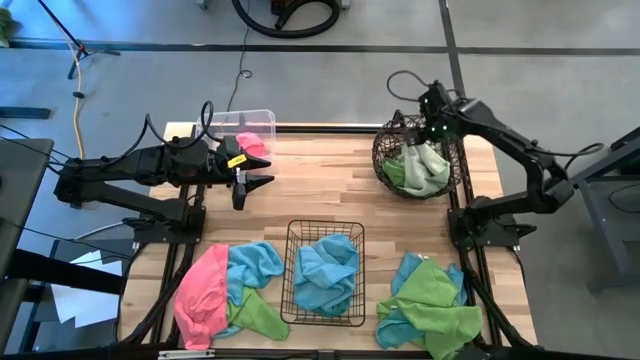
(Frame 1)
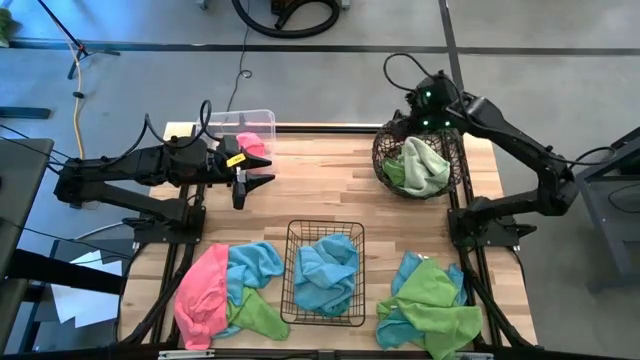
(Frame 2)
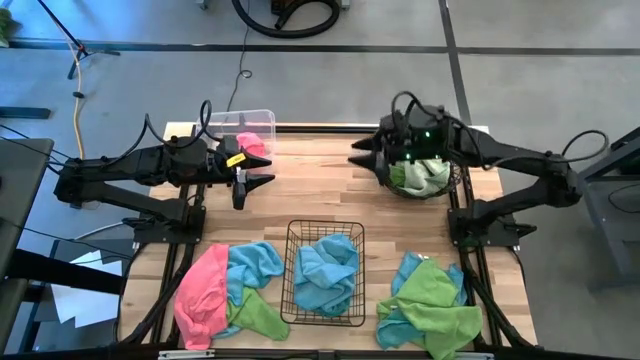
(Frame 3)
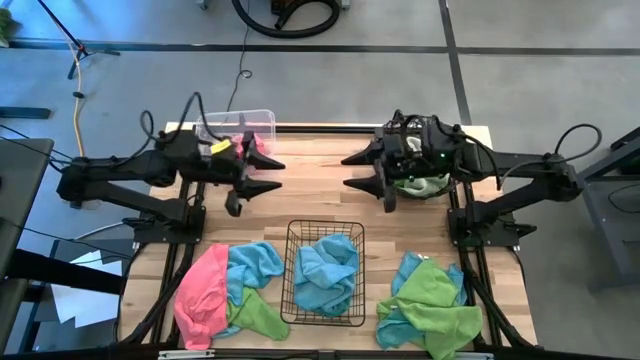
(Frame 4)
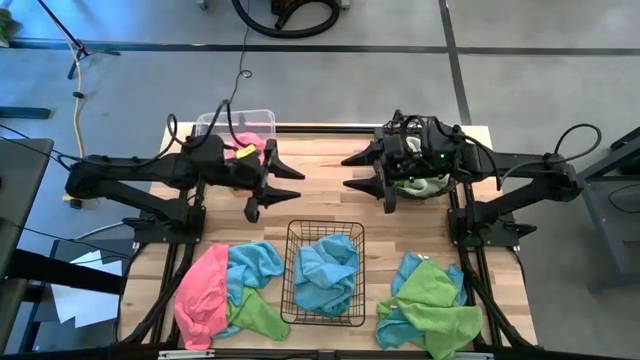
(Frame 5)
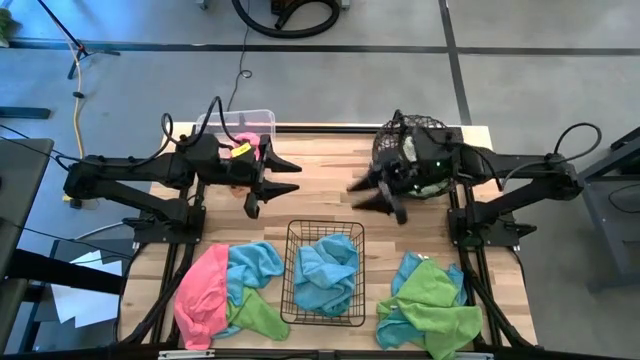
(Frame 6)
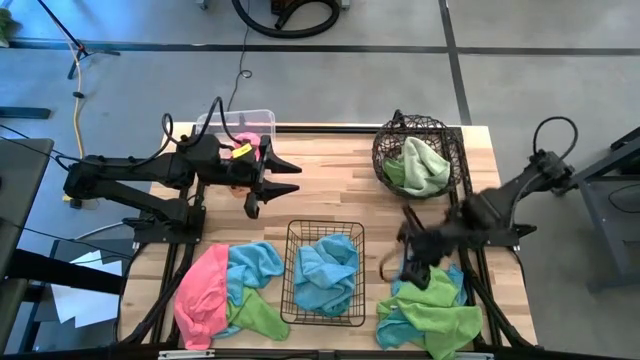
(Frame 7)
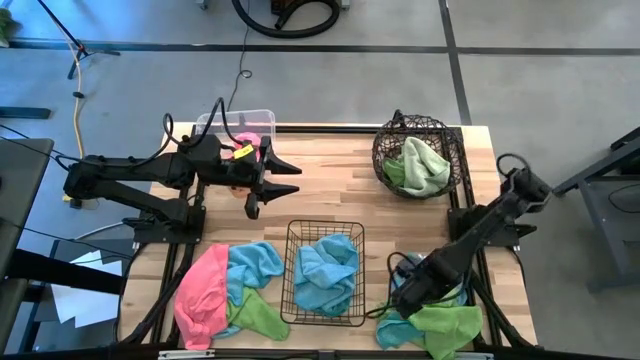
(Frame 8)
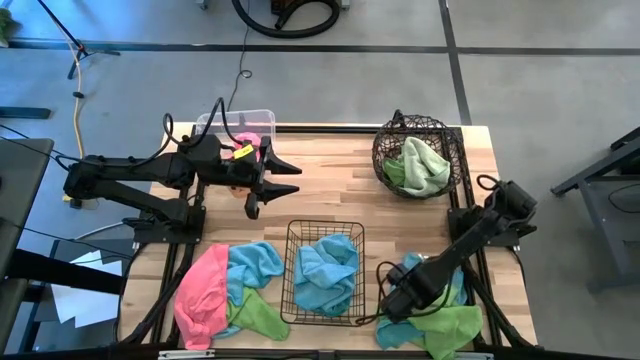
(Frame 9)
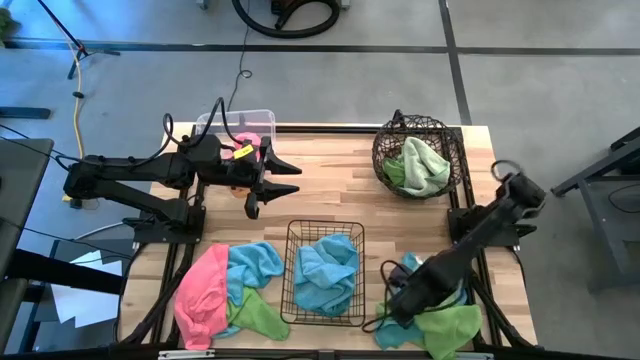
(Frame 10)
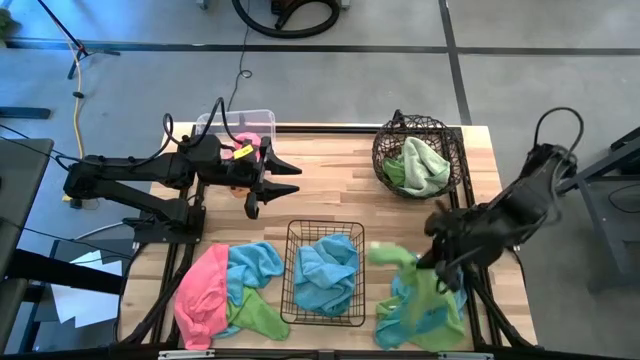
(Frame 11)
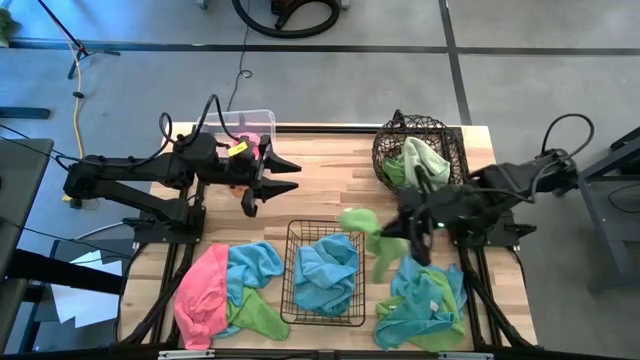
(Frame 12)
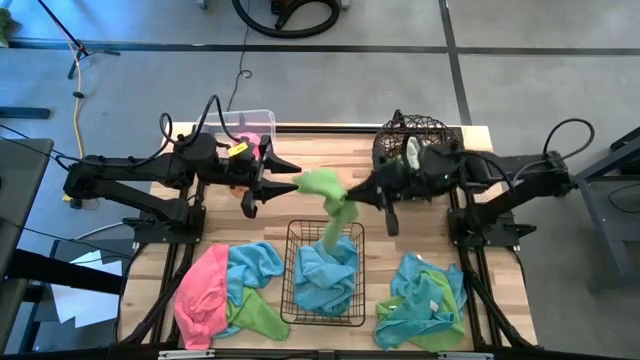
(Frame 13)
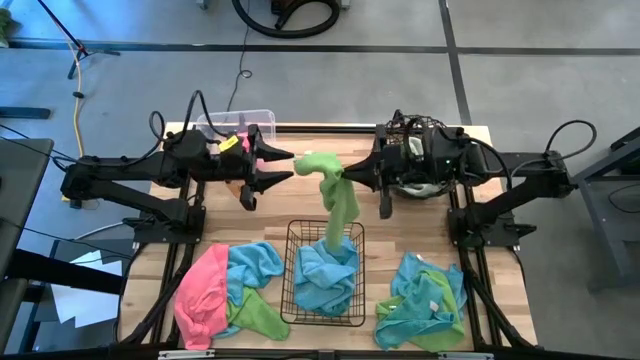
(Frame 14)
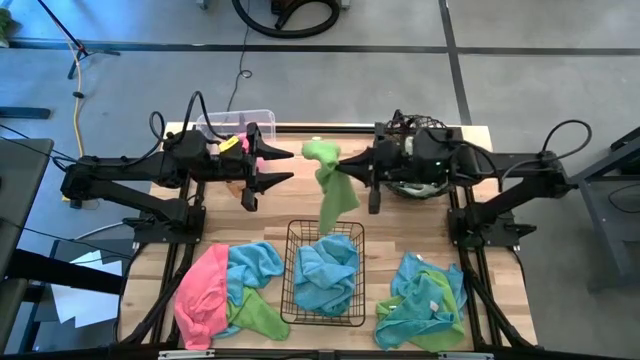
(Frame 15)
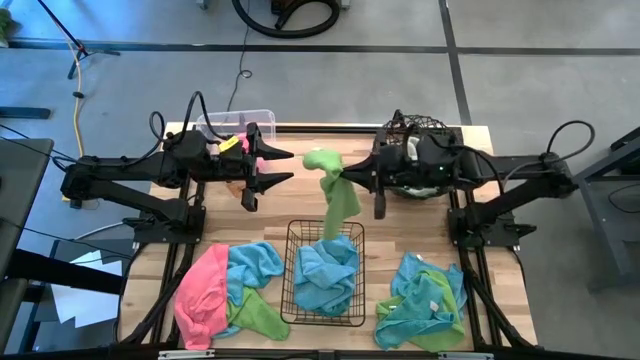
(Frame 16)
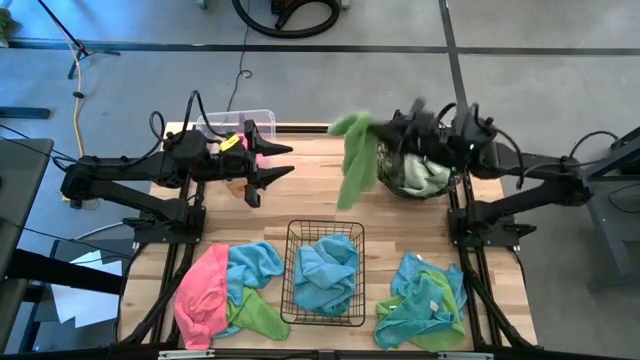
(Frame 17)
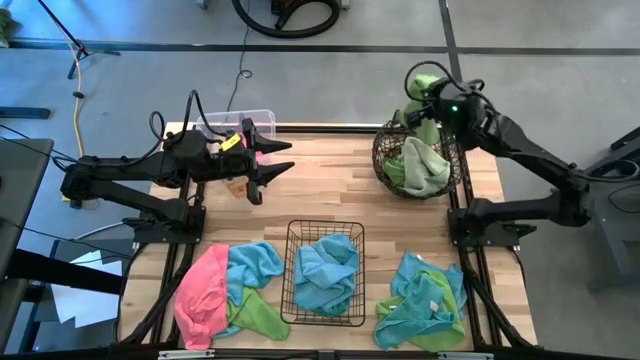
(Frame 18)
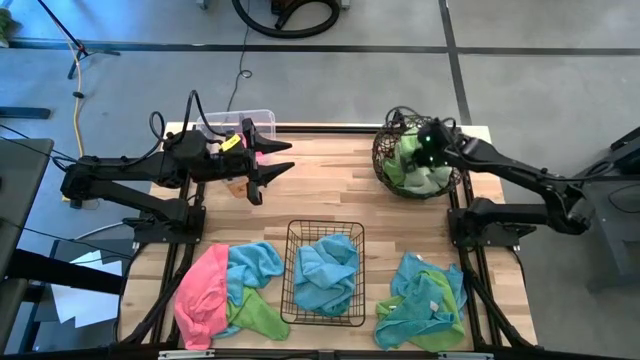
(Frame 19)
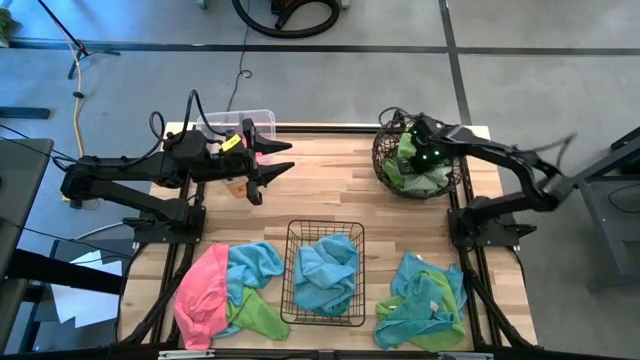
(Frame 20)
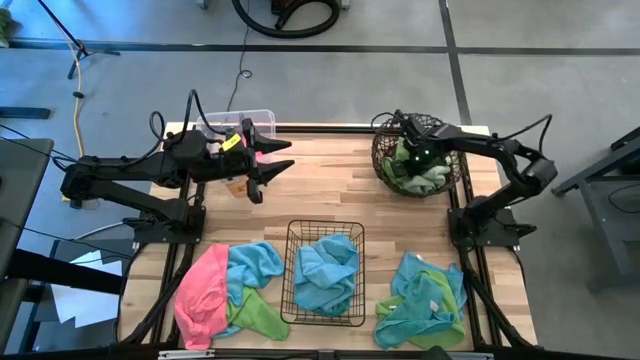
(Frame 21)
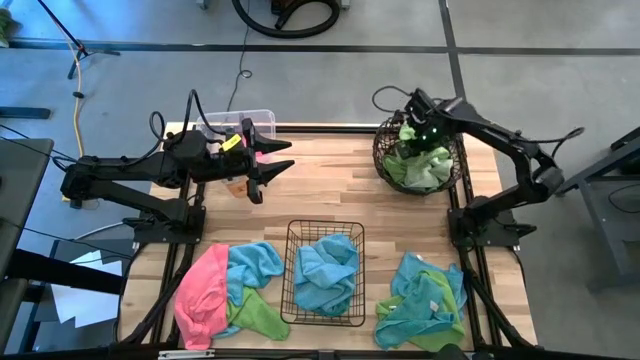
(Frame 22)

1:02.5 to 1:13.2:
Task: Sort microfiber towel by color & place in baskets
Put the green towel into the top right basket

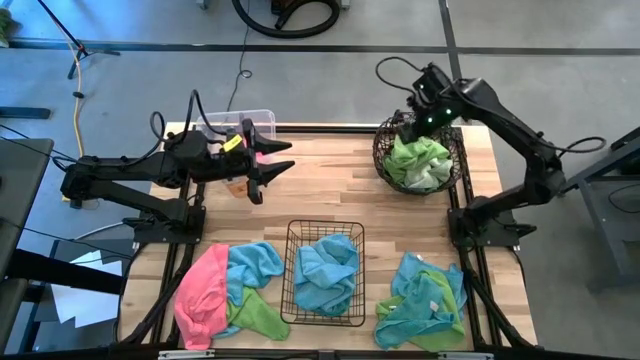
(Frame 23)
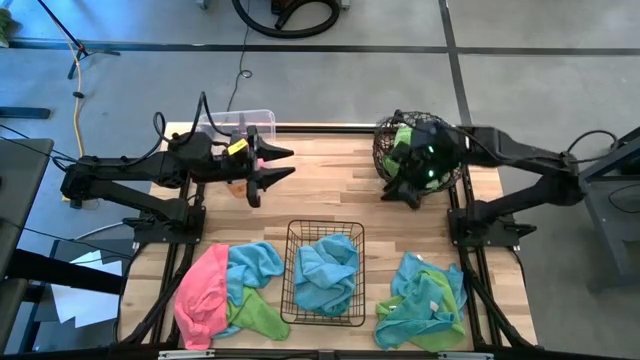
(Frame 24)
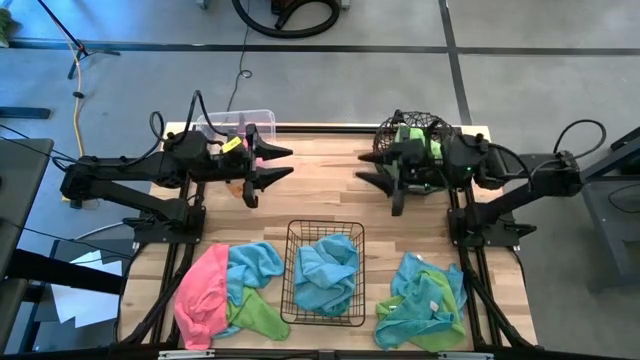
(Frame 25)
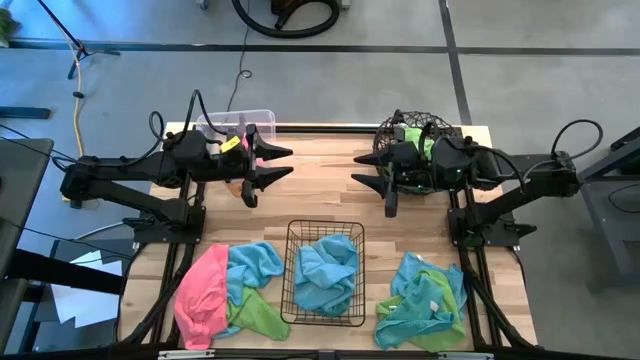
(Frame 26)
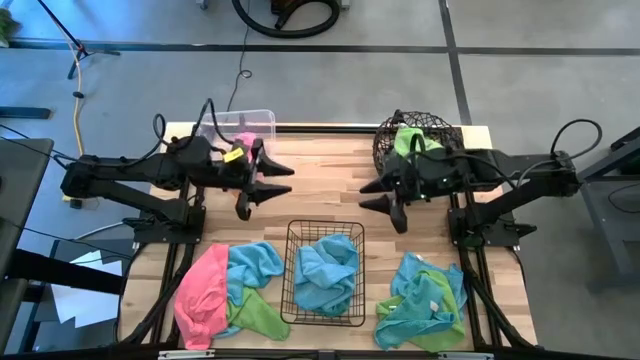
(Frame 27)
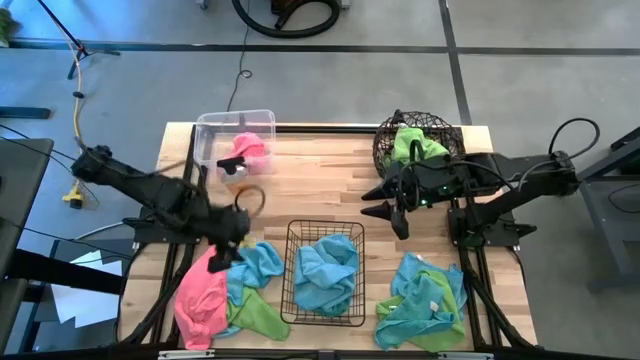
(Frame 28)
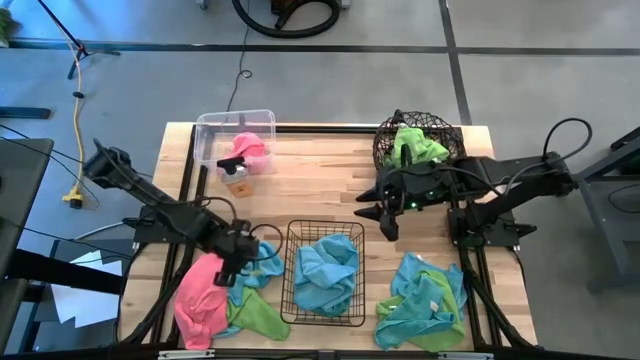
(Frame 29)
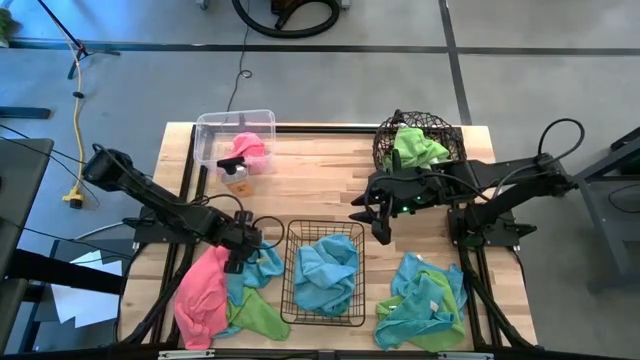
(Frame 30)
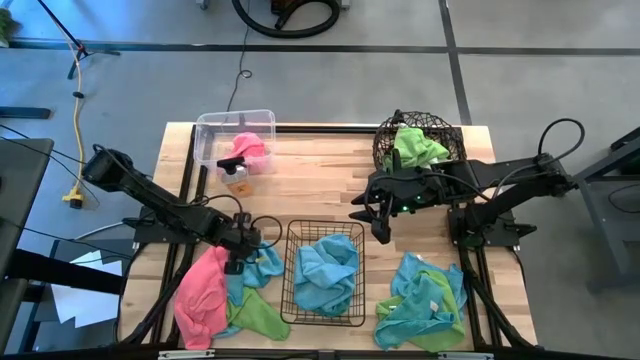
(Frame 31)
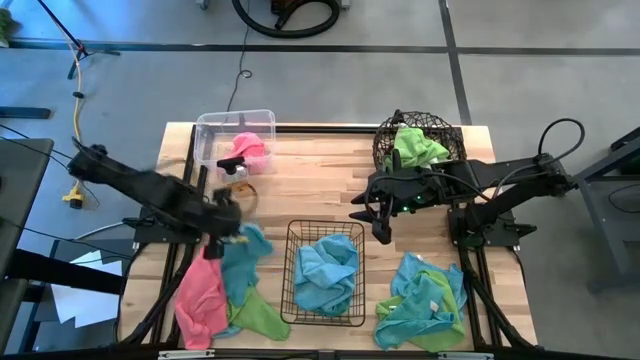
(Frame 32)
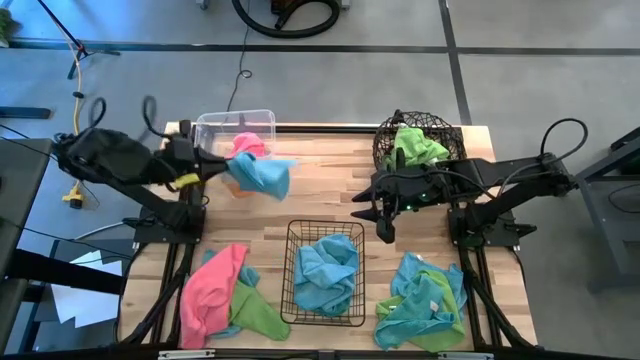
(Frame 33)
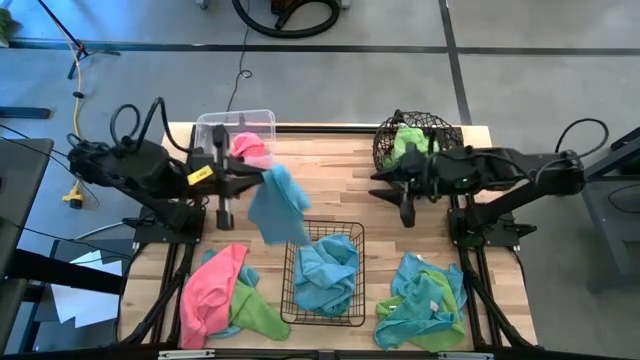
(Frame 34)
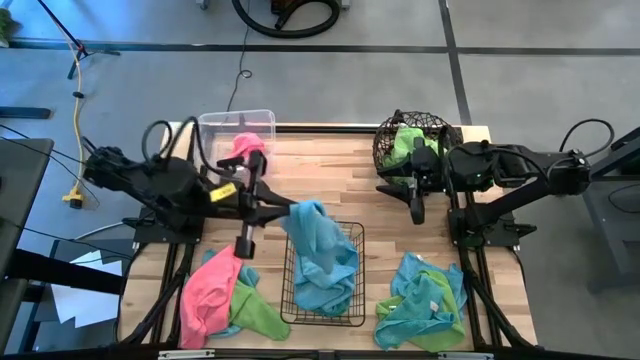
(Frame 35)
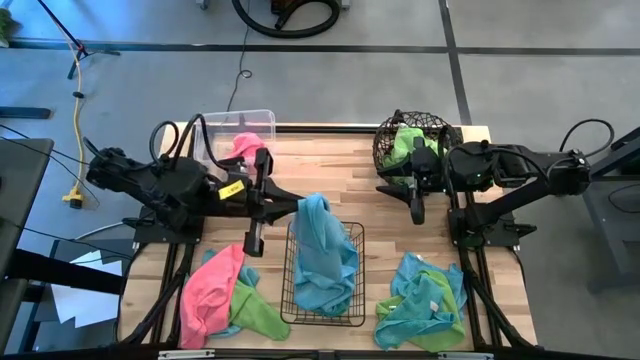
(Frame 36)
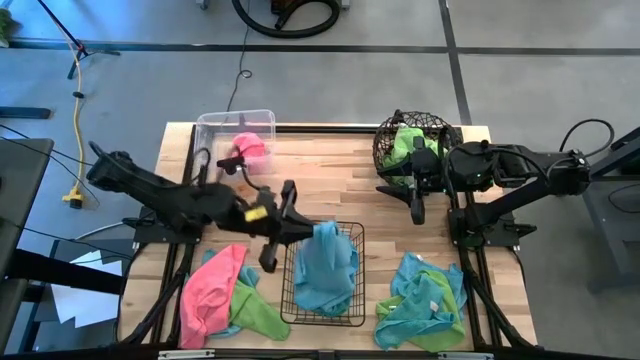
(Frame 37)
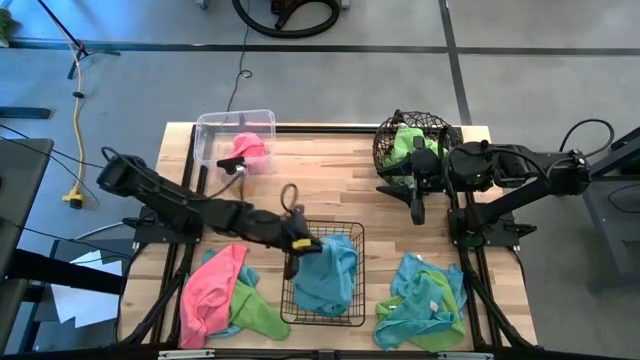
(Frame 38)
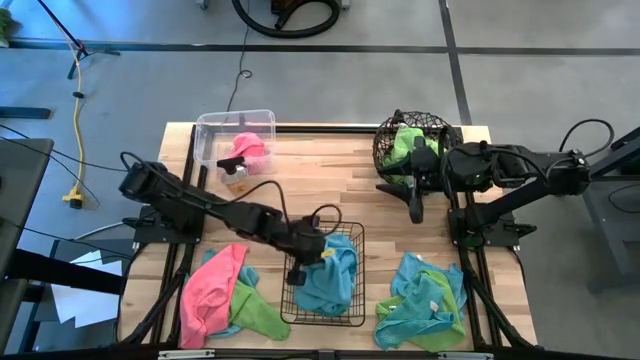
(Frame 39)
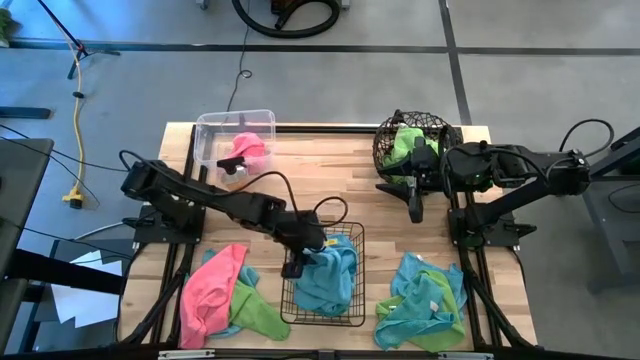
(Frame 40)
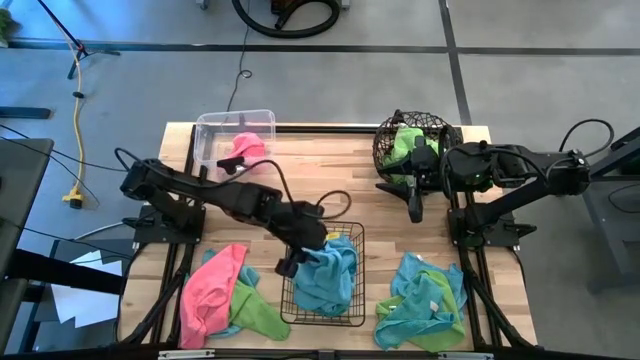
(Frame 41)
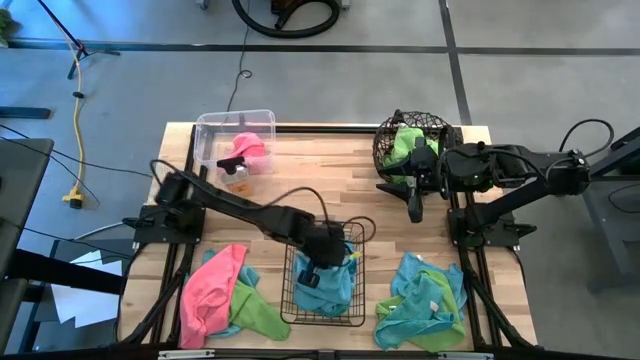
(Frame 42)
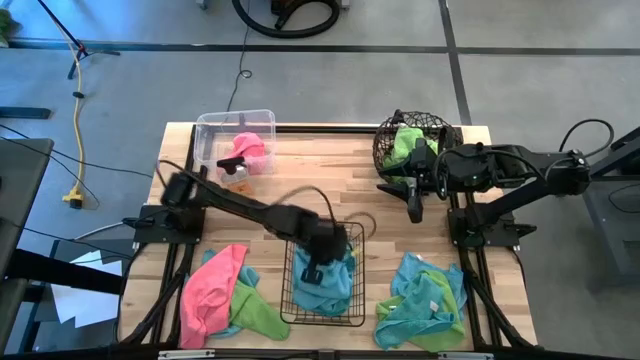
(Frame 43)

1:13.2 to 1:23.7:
Put the blue towel into the bottom basket

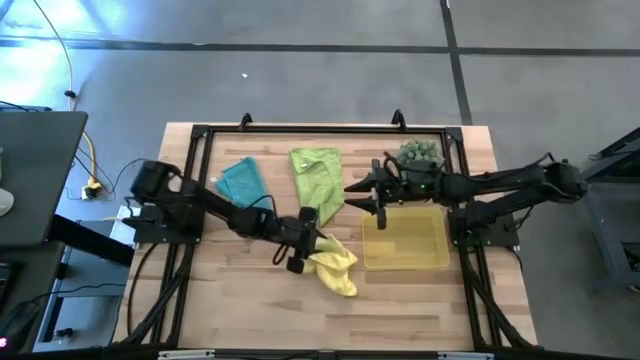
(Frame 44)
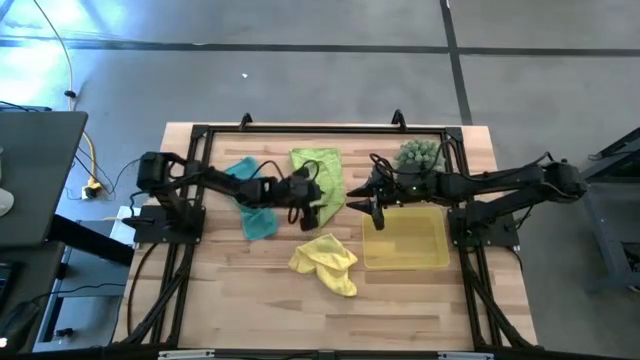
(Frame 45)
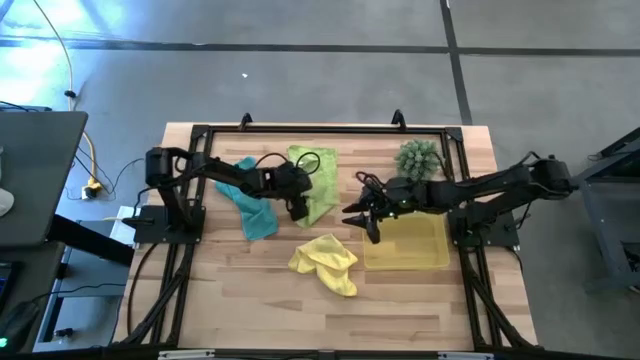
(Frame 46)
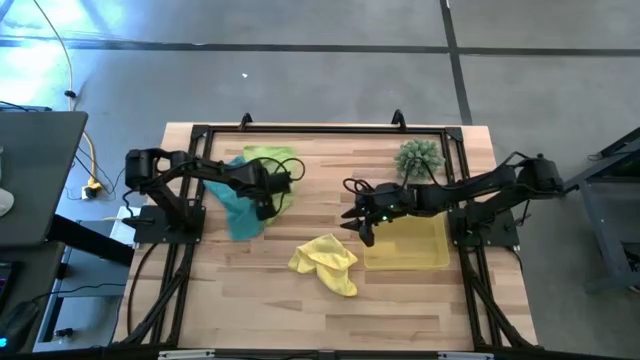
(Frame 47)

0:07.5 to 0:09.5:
Task: Roll microfiber towels into tight, uniform cylinder then place into a basket
Adjust the green microfiber towel
